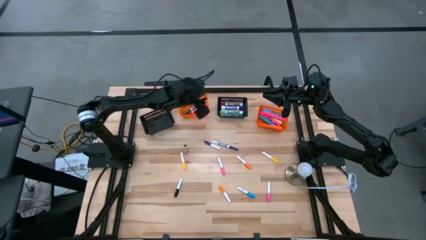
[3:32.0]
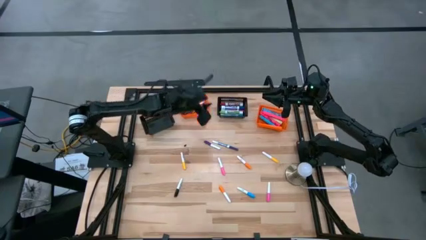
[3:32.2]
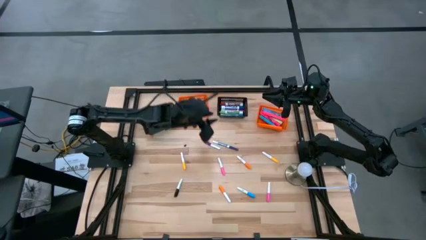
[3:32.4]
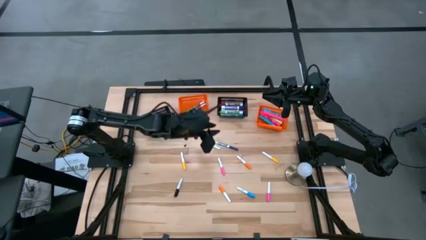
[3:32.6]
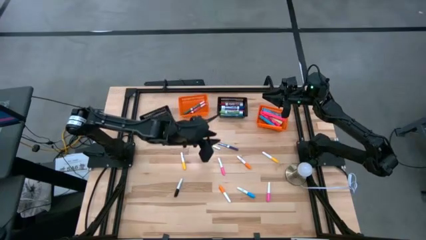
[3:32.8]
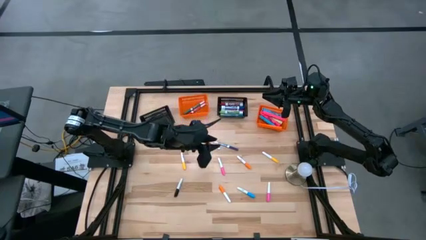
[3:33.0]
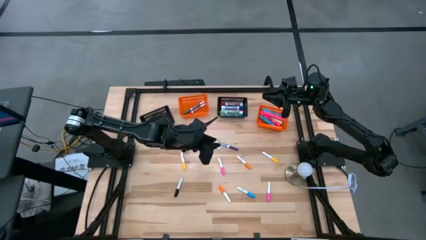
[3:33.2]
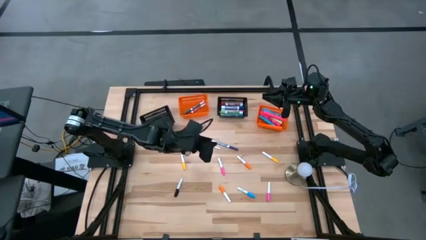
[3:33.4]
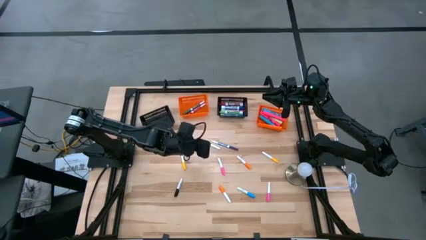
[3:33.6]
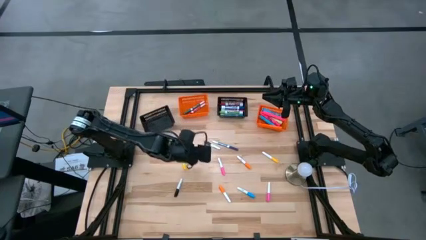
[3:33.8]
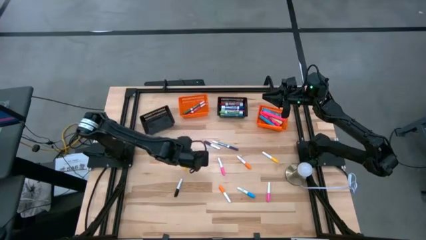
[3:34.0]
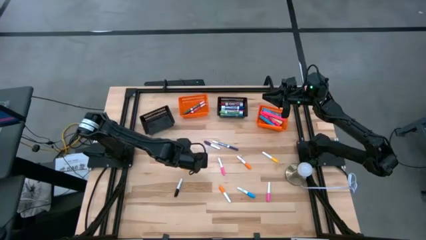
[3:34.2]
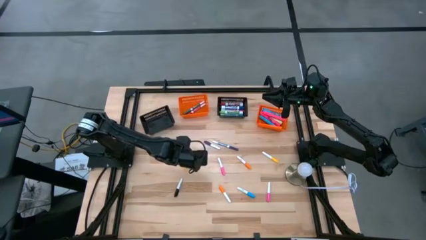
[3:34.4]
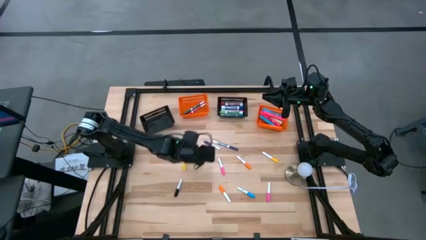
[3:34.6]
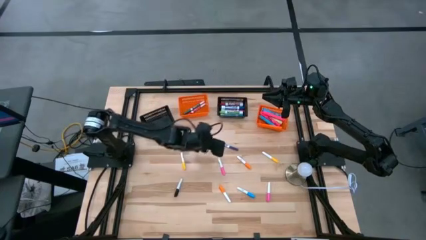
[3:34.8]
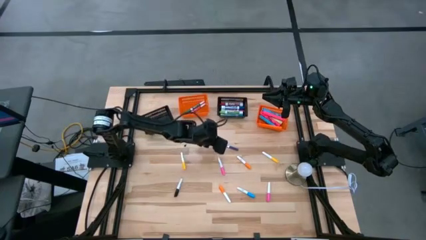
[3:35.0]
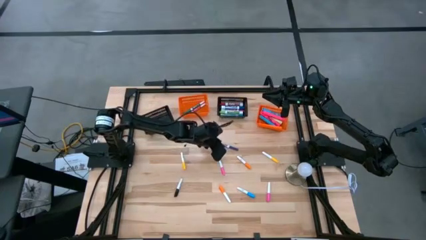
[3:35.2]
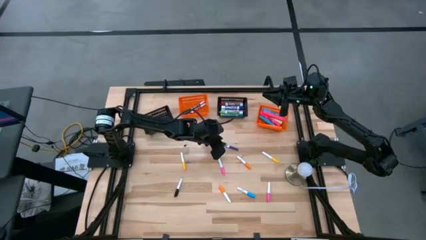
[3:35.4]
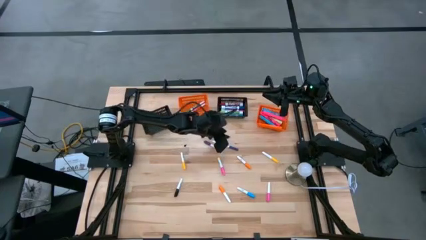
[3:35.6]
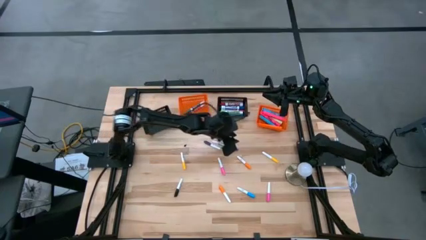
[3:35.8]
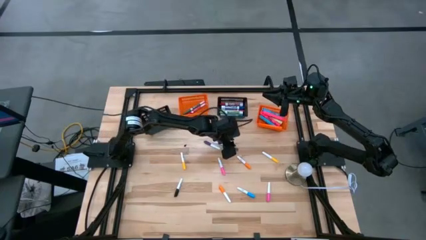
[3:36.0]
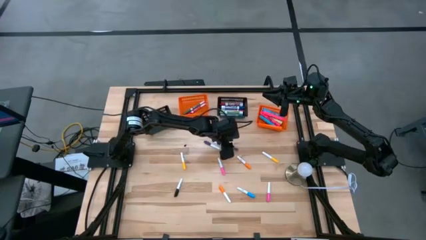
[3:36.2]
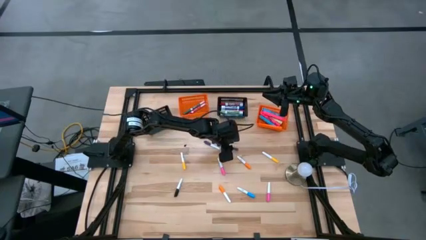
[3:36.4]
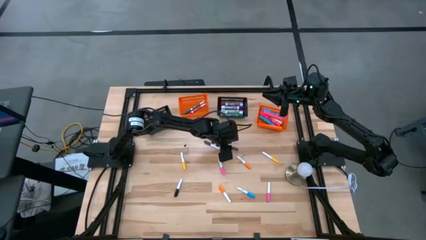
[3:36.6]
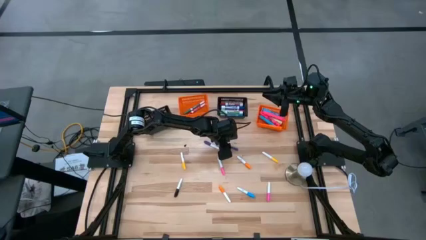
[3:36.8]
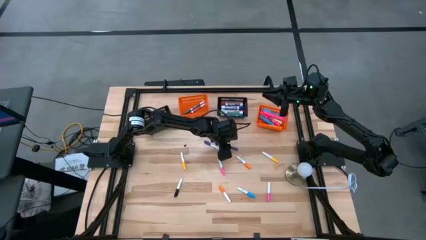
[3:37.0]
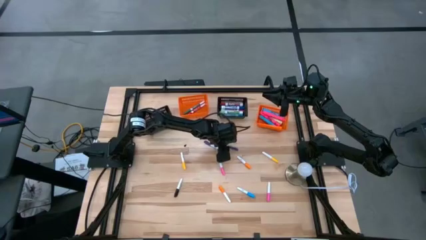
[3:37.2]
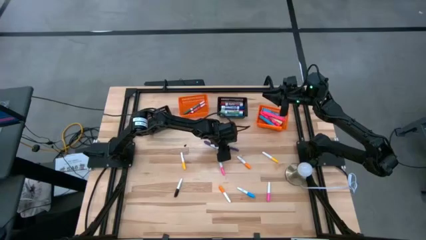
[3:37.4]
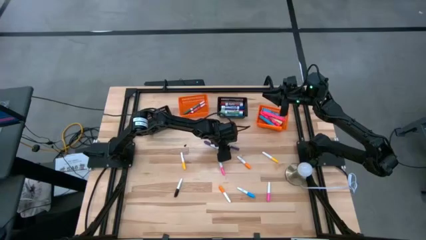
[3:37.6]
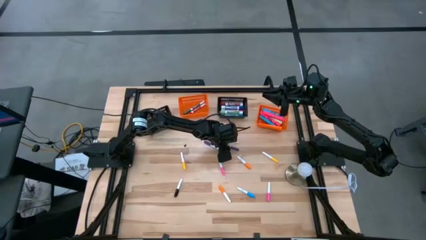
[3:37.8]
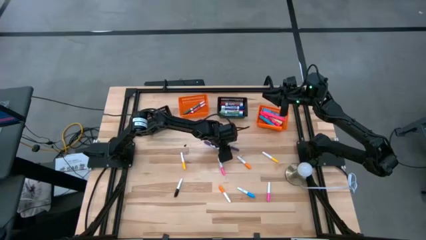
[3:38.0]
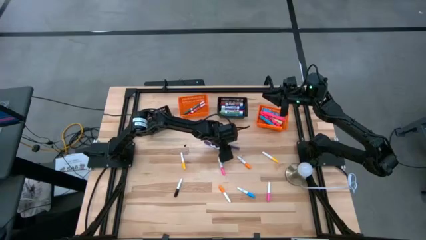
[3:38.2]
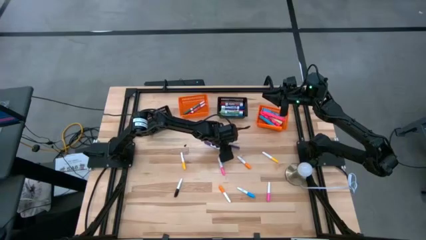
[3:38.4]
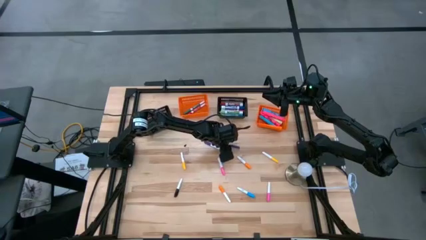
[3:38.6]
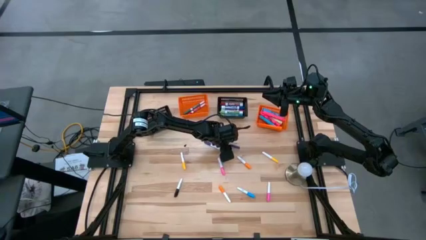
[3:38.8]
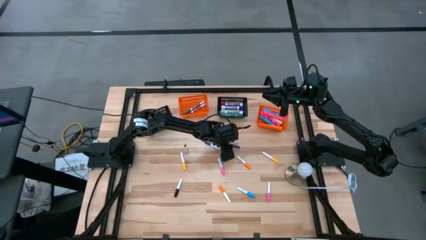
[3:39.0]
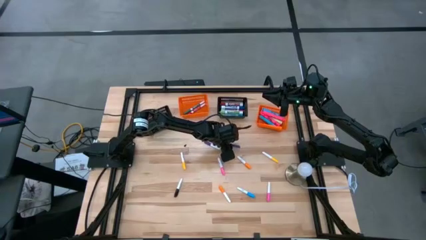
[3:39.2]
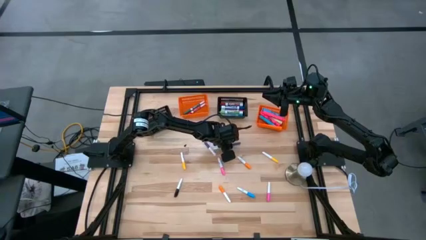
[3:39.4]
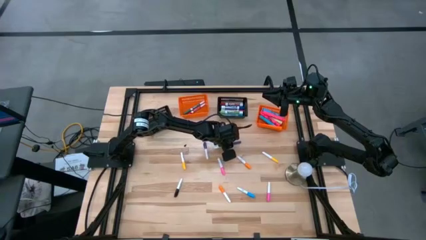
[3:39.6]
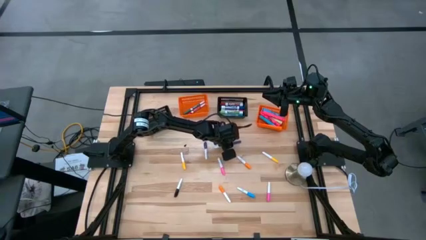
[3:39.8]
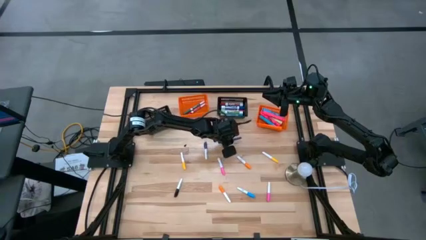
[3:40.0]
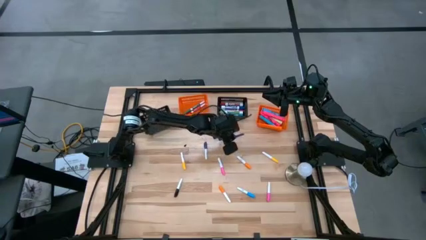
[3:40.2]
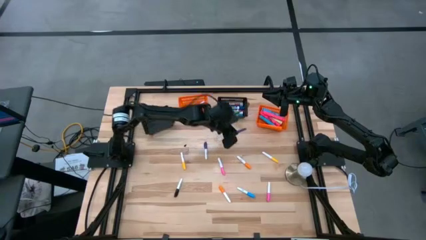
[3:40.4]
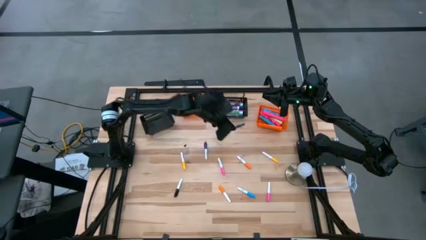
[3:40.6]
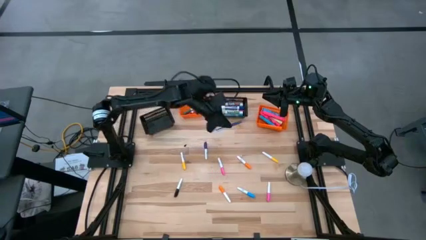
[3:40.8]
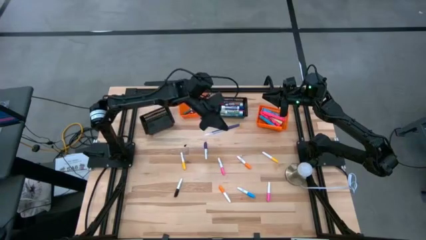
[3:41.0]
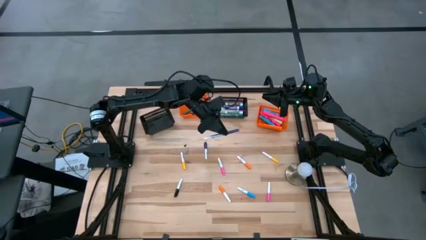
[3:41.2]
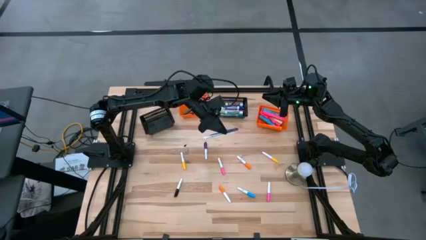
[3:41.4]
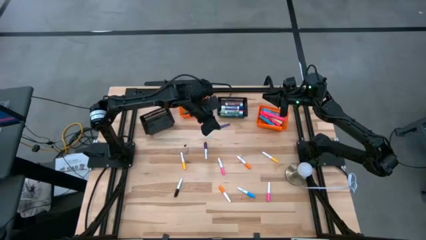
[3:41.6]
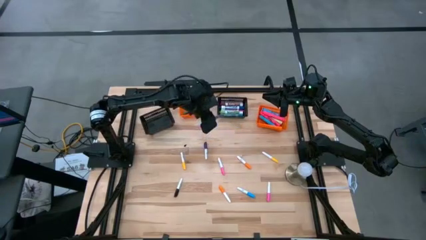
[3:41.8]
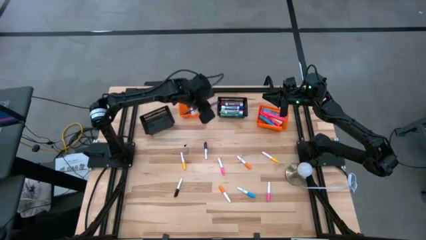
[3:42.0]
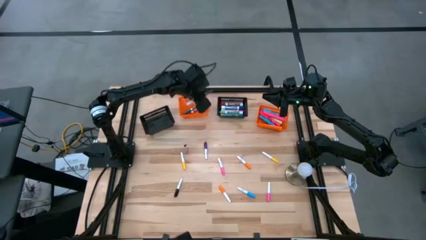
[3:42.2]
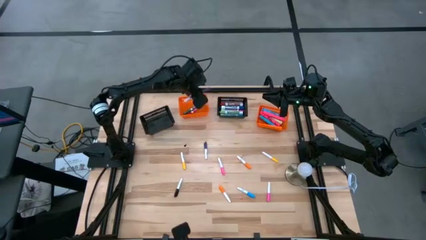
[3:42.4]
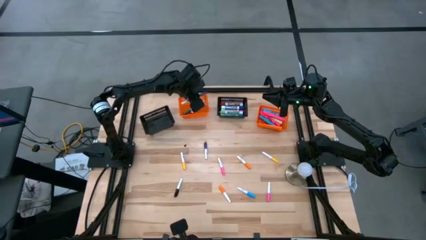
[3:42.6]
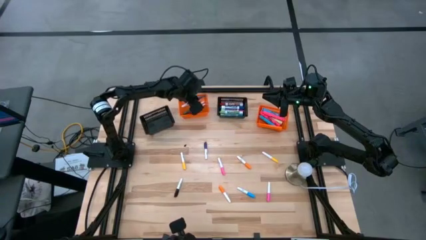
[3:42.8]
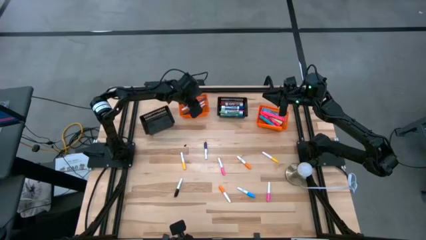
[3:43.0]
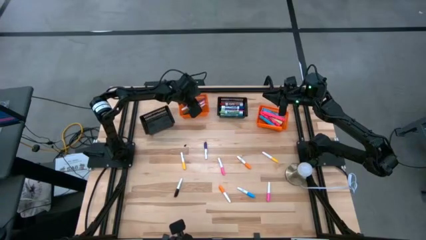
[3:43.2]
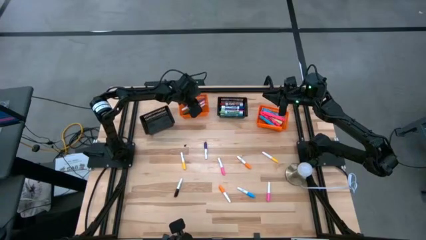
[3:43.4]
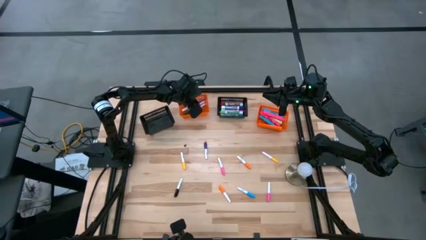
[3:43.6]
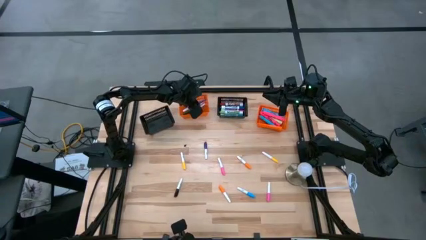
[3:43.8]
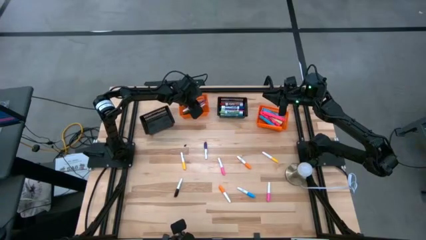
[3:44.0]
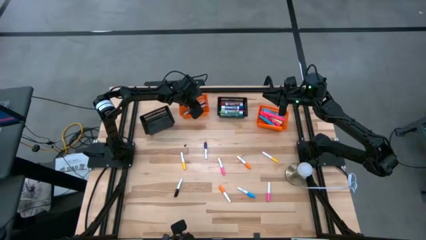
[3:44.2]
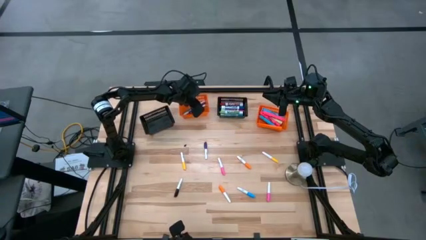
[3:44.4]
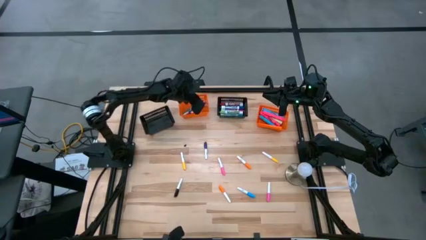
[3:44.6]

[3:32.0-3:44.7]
Task: Pick & Place Markers
Put the blue marker into the left orange bin

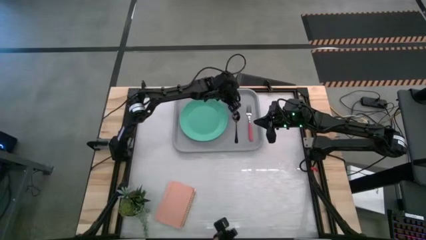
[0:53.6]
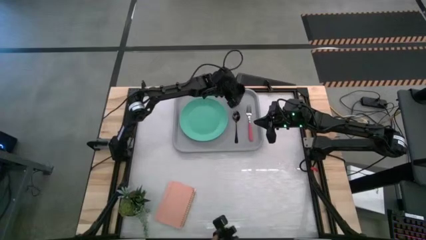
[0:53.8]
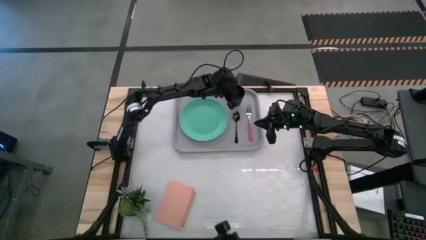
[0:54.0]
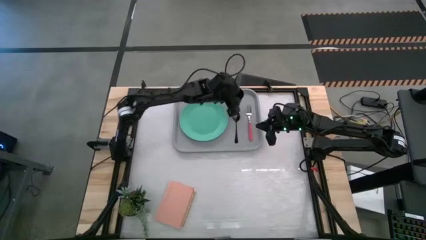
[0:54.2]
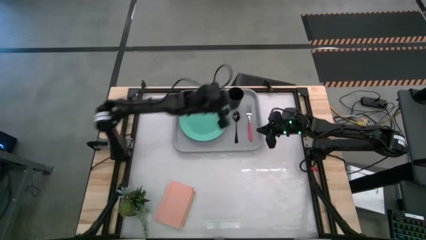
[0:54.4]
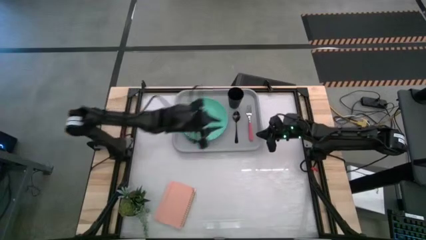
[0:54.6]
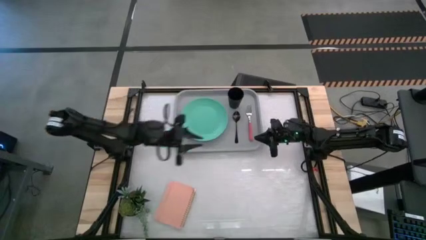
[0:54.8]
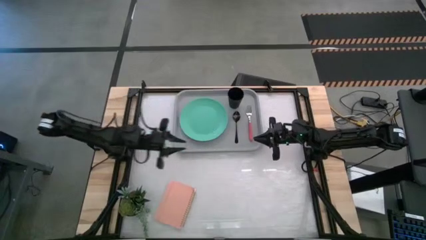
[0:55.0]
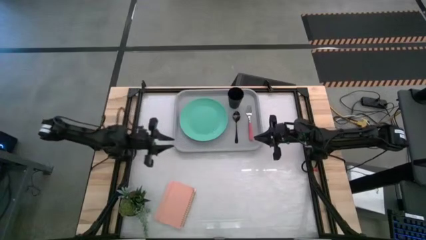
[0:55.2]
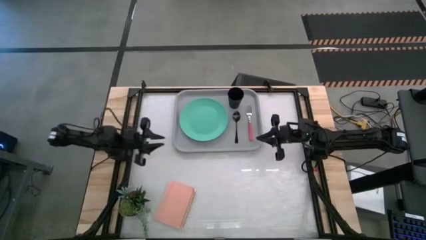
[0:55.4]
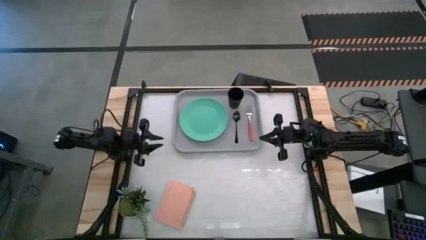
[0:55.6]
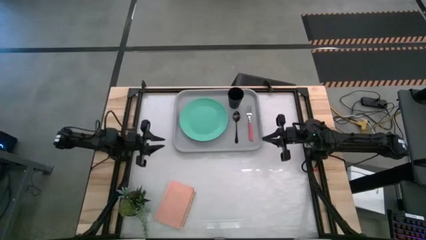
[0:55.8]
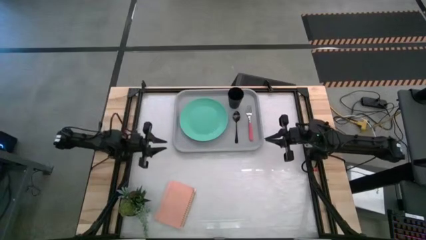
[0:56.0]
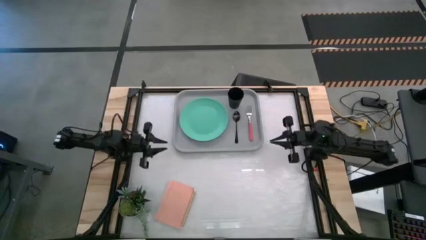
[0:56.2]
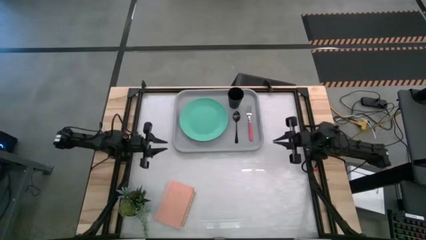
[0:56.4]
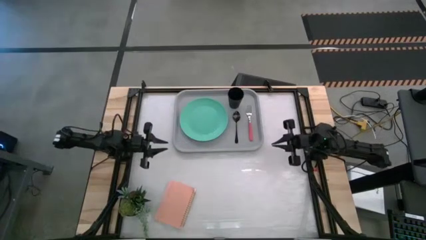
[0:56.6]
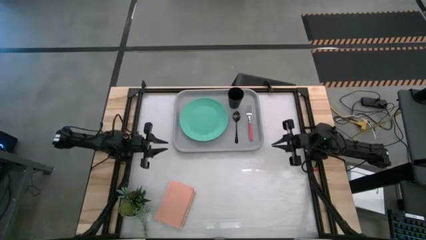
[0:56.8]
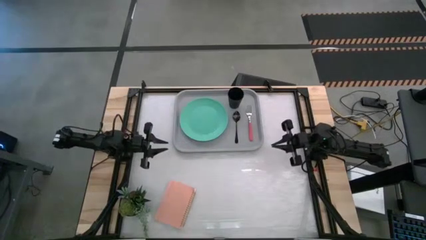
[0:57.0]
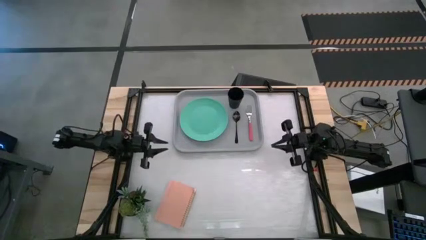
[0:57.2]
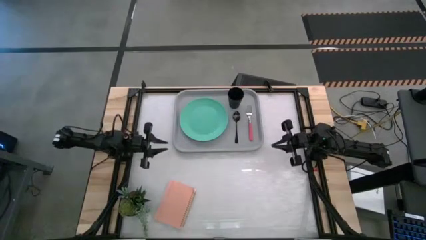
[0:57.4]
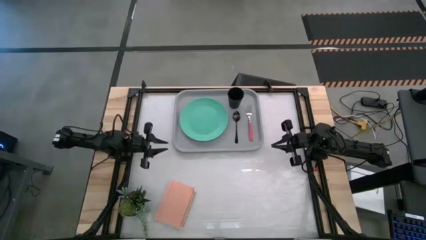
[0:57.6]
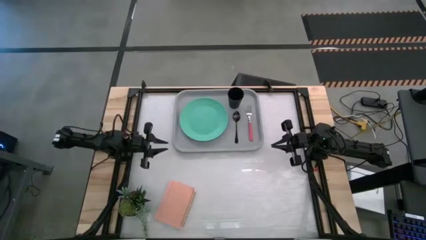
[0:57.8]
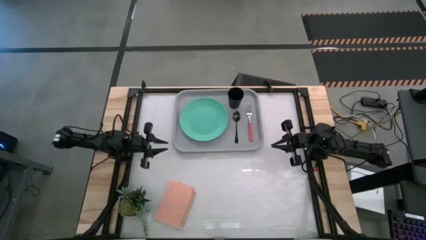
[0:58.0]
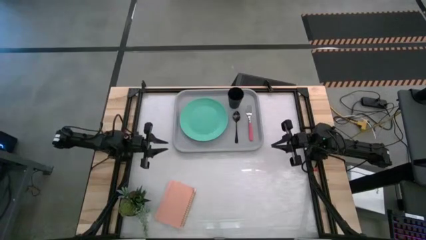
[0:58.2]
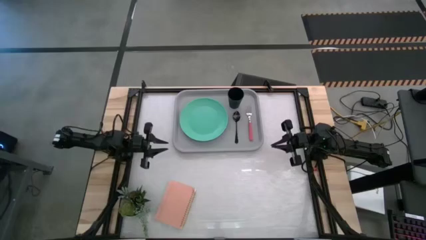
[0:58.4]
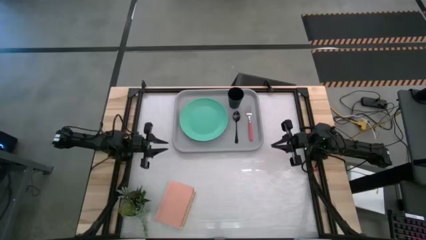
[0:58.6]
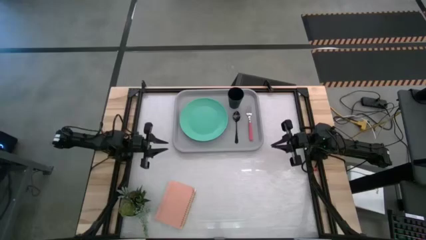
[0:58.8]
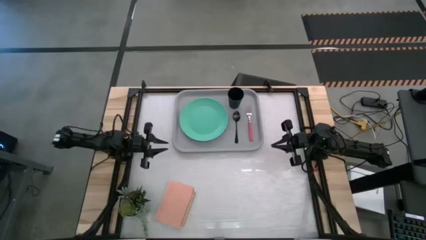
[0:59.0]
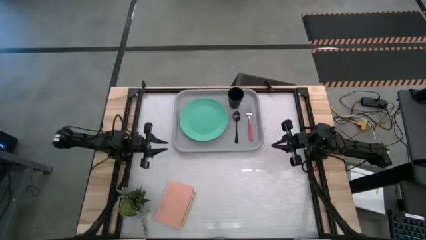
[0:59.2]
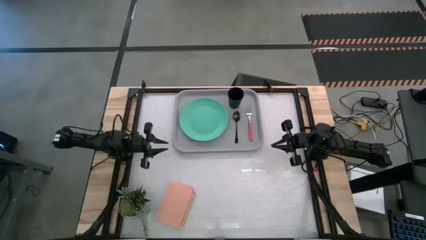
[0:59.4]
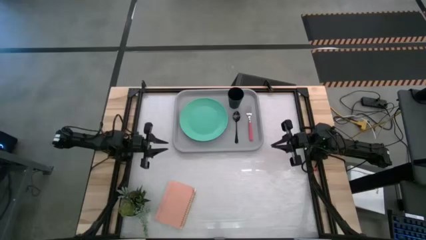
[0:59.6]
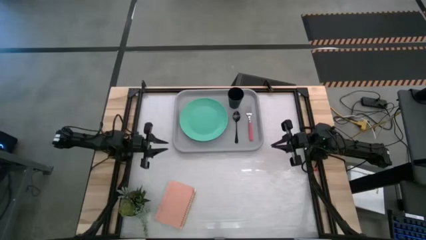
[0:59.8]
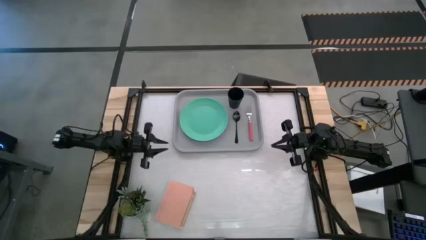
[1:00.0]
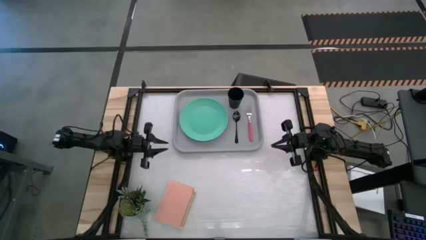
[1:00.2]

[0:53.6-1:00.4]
Task: Pick and place plate/cup/fork/spoon on tray
Return to Home Position
